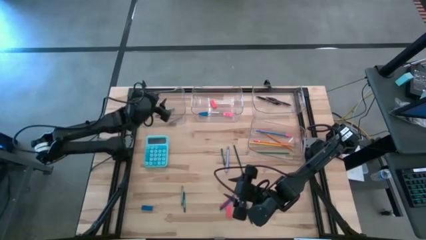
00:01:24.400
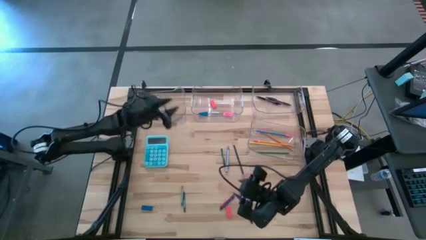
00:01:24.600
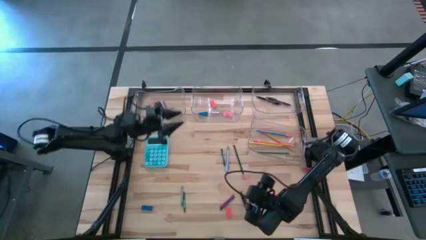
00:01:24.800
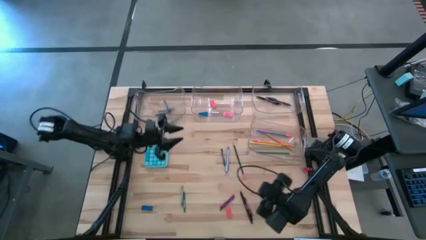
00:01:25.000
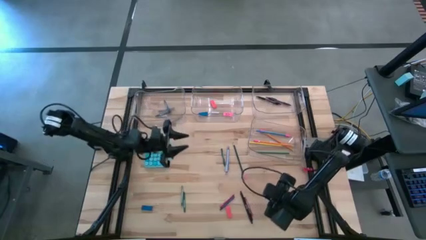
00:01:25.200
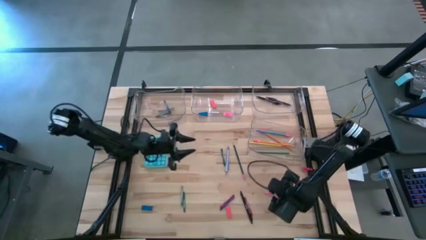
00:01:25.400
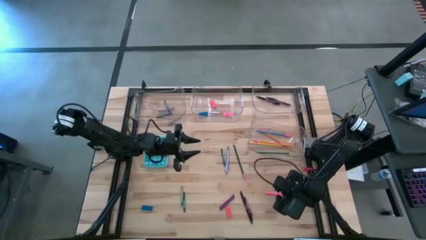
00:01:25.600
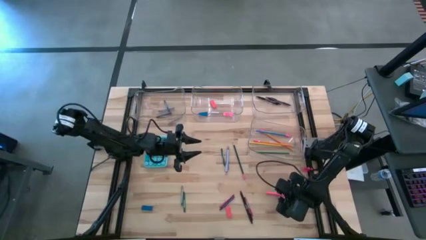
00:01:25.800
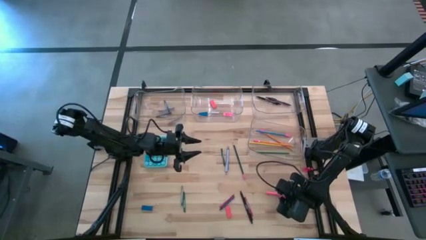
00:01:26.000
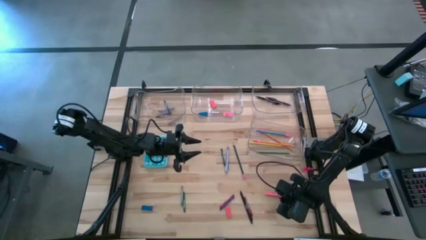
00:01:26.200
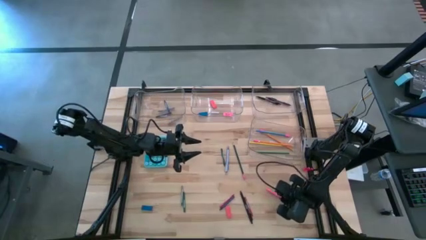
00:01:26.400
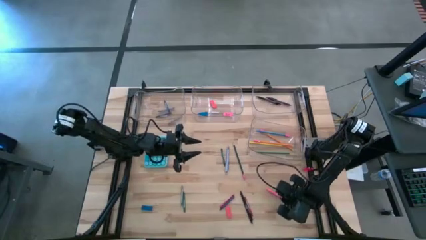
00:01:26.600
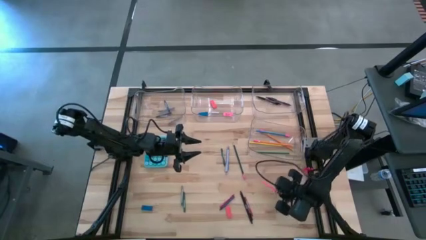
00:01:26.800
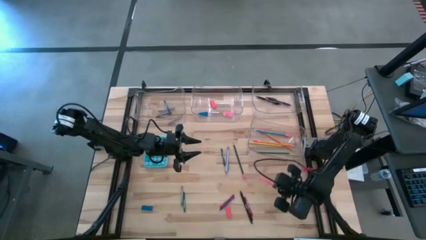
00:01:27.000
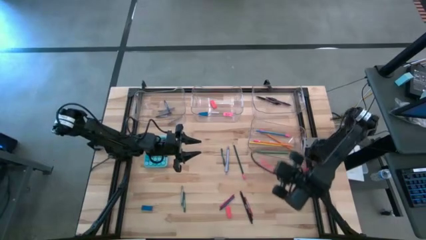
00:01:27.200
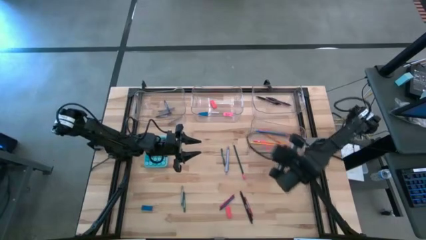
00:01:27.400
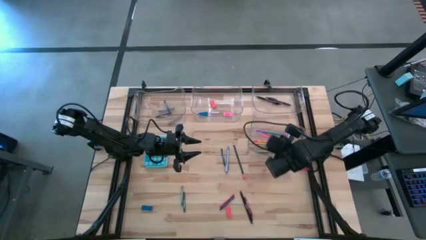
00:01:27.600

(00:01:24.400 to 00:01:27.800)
Task: Sort crayons/erasers/pens/pencils in bins
Put the pink colored pencil into the bottom transparent bin

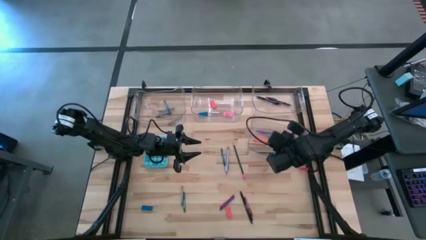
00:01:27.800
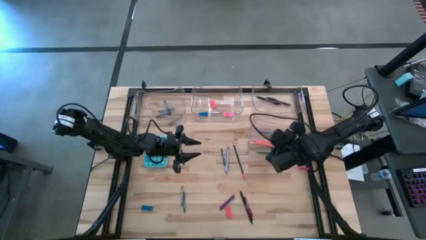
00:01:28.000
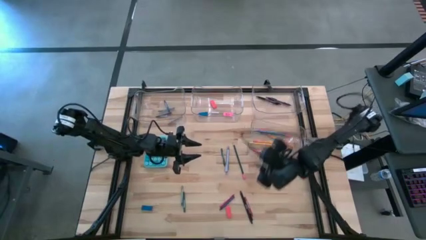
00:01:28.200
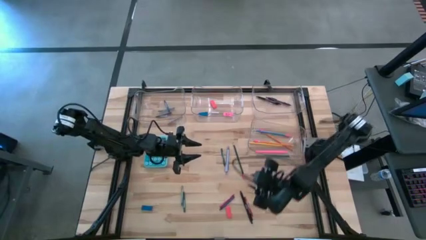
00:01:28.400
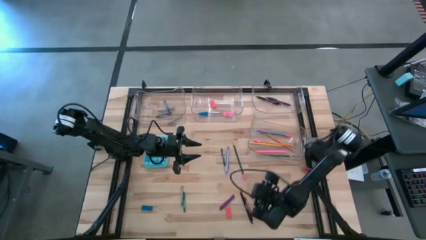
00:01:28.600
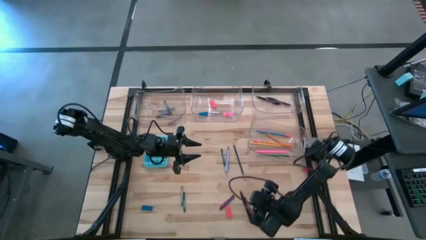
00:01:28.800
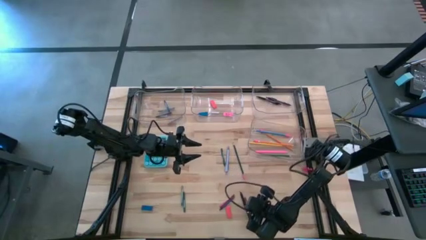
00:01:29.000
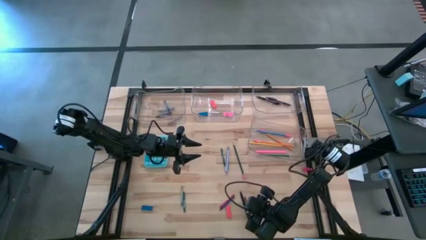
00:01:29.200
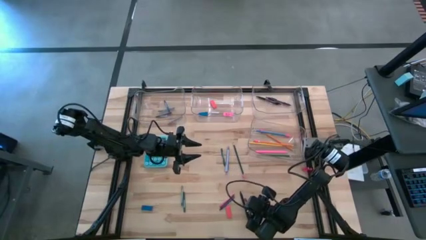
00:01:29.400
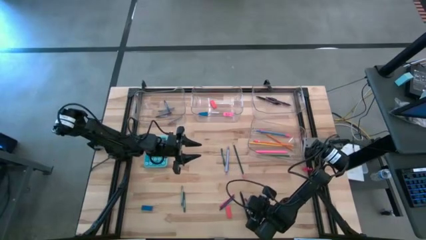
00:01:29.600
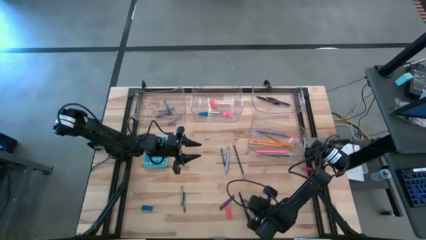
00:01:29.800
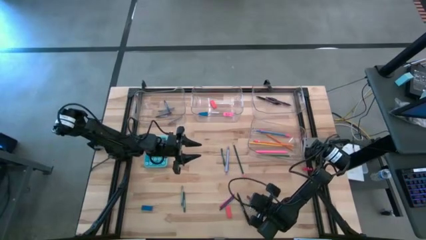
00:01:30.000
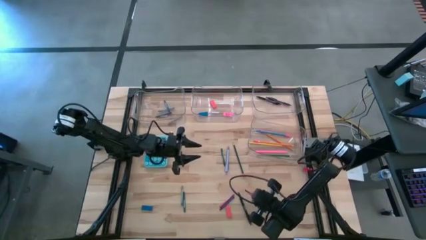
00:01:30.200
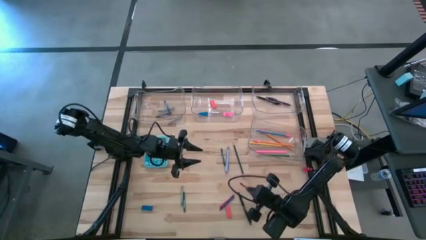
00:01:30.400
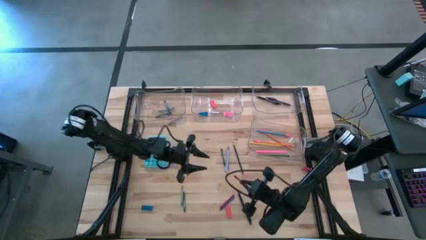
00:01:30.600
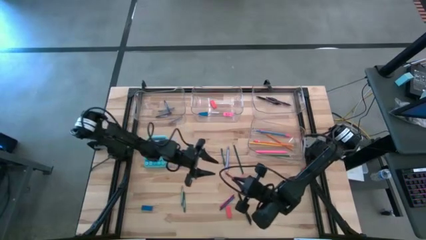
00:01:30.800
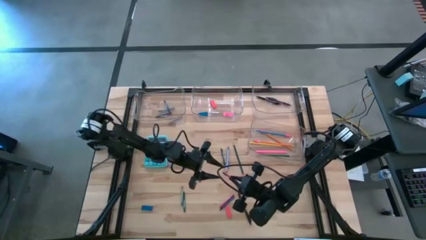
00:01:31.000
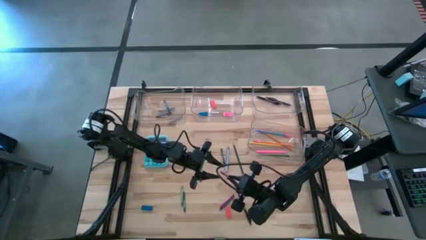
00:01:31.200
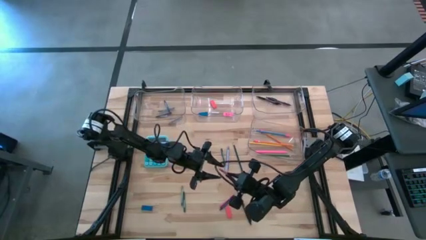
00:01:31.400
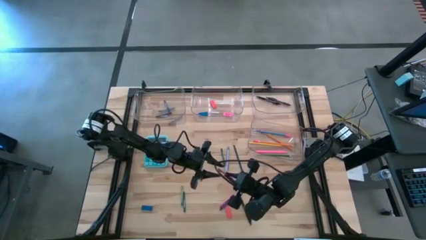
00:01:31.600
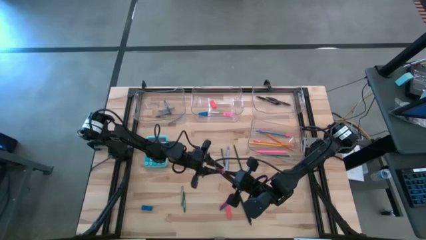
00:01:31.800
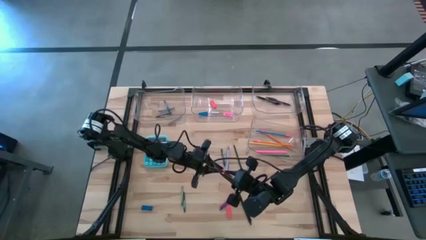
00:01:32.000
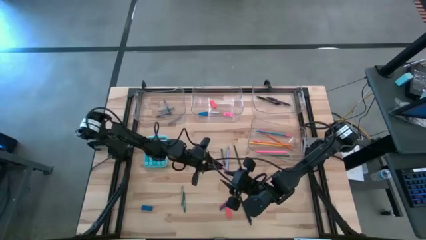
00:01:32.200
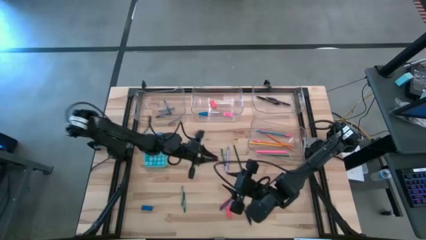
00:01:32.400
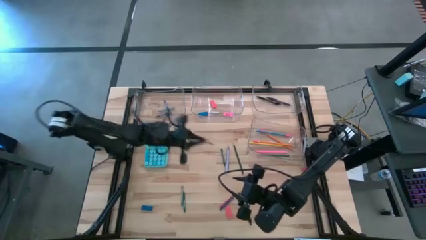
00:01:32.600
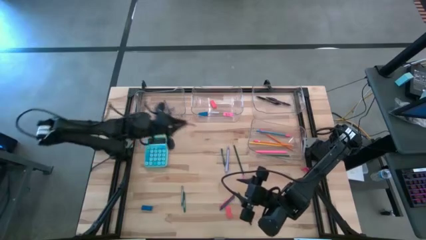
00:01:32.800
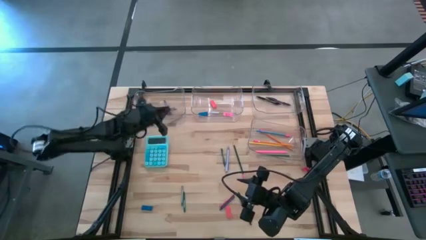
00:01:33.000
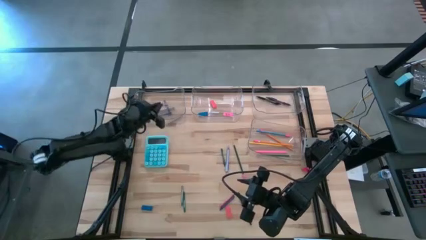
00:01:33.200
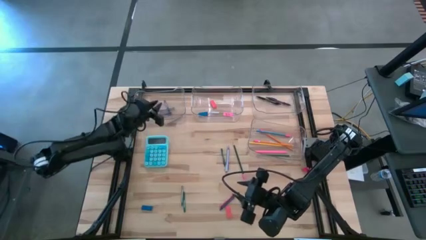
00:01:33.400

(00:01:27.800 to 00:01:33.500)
Put the red crayon into the top left transparent bin

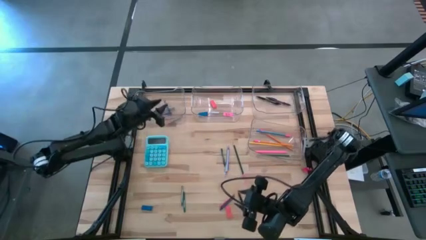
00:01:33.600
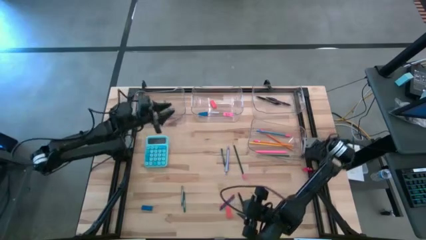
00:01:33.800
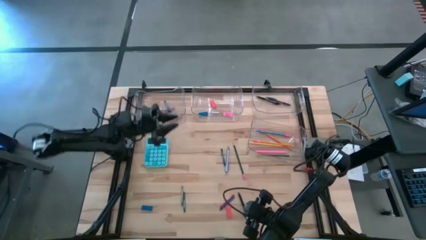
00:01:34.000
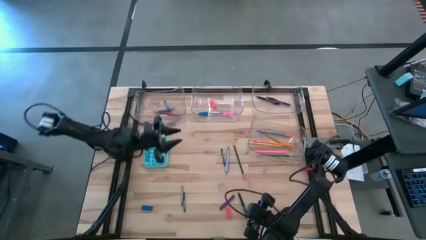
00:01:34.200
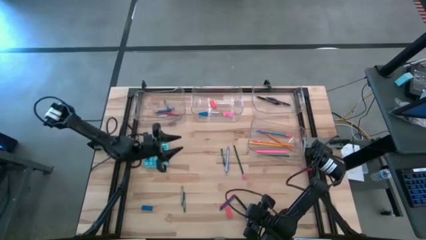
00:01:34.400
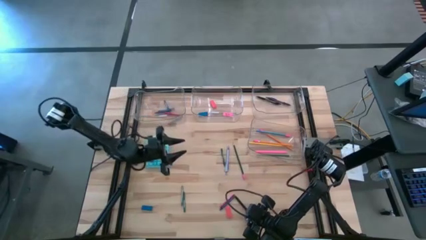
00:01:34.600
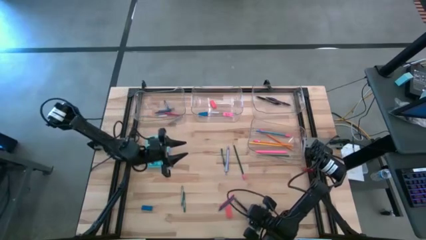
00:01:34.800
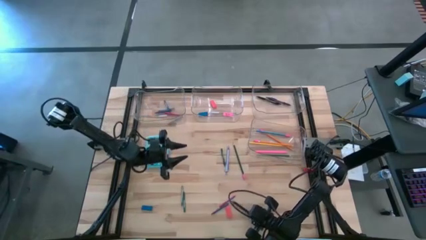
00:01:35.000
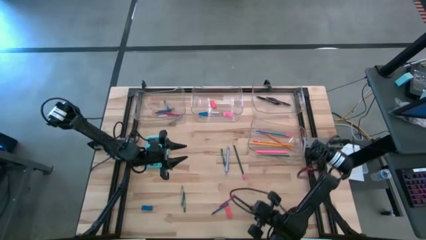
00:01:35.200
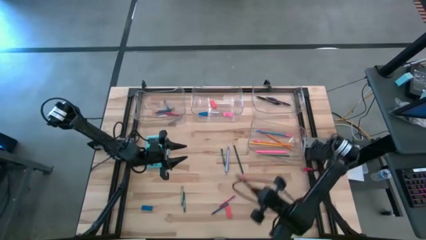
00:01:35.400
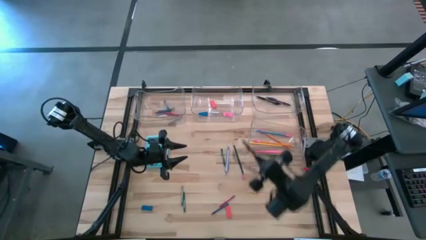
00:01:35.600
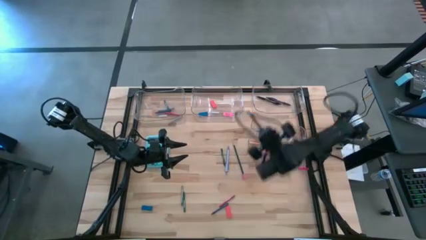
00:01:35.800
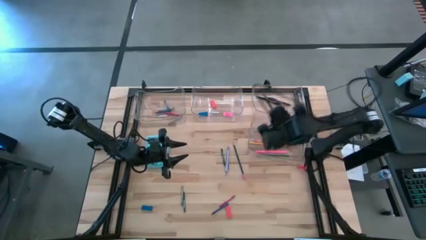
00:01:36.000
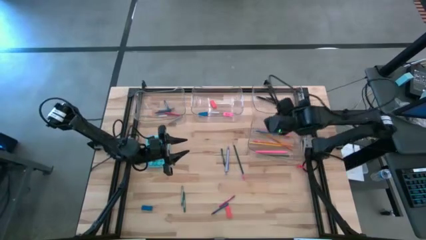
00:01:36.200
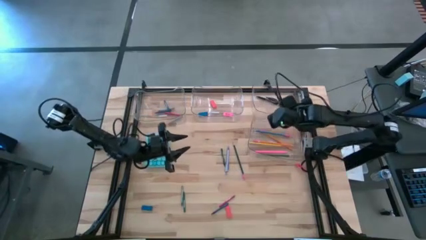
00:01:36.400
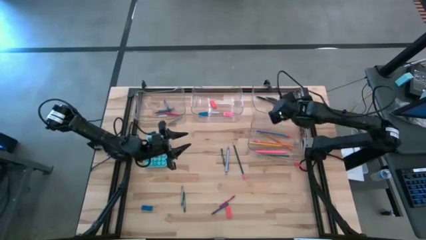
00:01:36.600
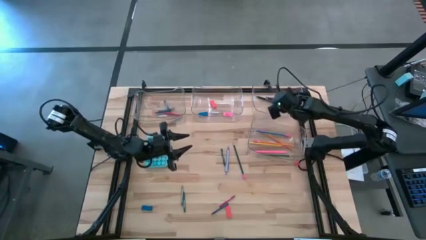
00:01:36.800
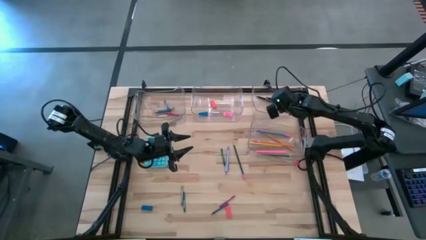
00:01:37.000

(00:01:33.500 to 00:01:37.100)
Put the black pen into the top right transparent bin

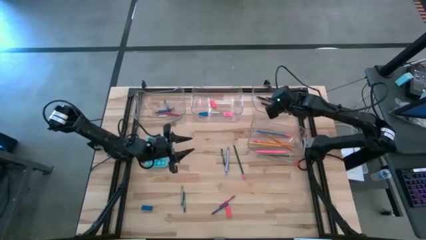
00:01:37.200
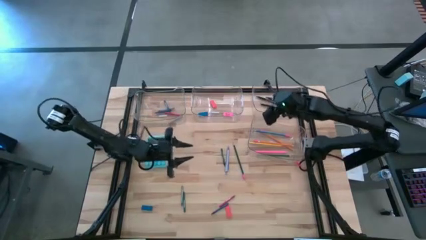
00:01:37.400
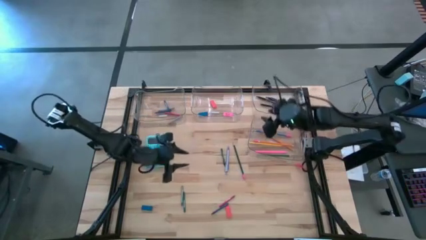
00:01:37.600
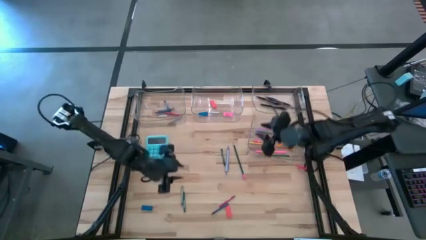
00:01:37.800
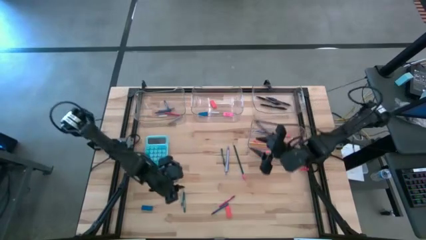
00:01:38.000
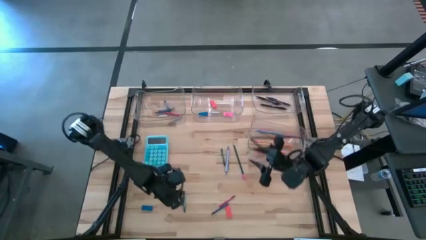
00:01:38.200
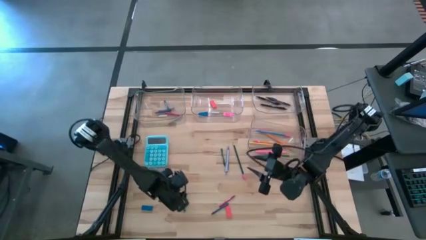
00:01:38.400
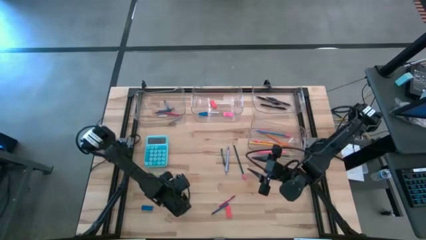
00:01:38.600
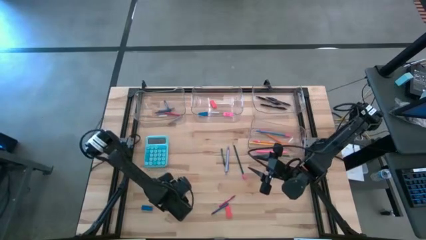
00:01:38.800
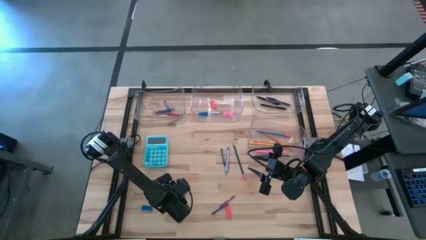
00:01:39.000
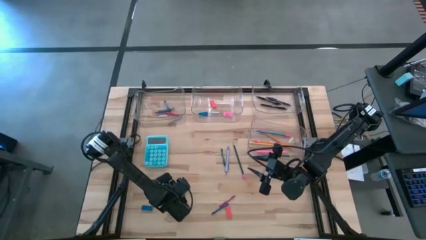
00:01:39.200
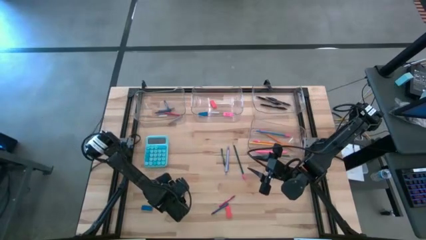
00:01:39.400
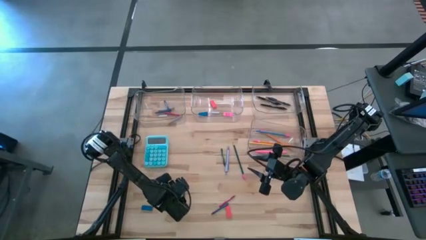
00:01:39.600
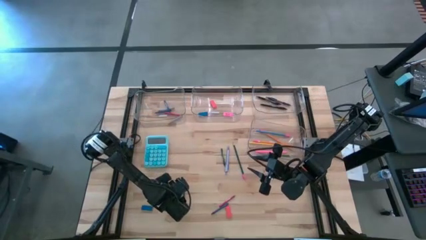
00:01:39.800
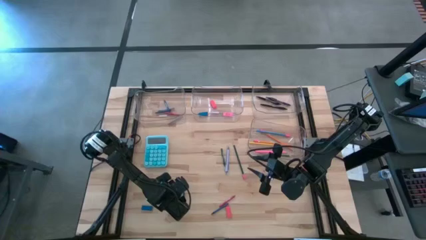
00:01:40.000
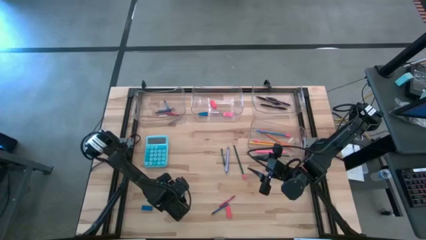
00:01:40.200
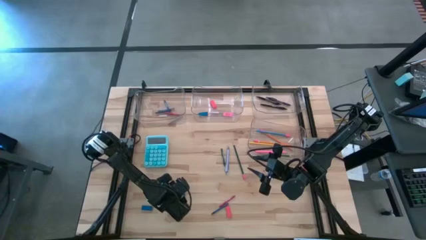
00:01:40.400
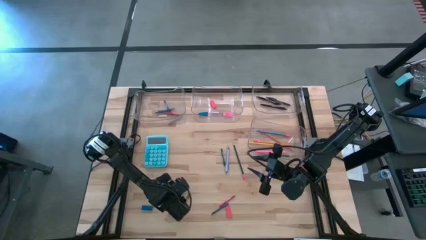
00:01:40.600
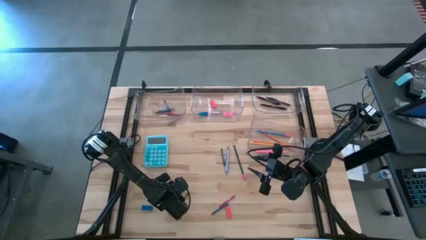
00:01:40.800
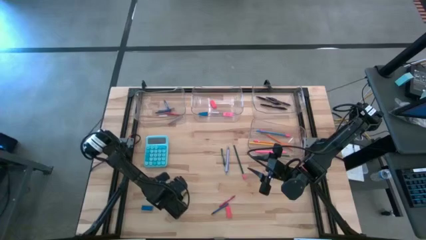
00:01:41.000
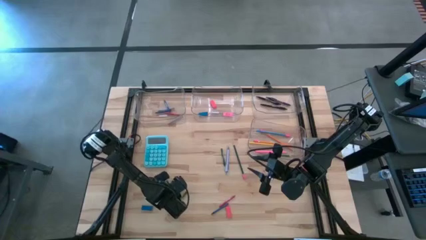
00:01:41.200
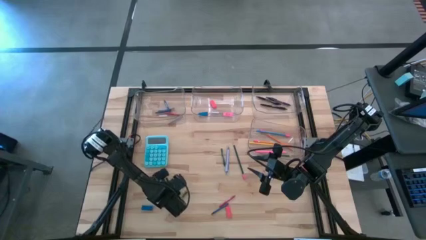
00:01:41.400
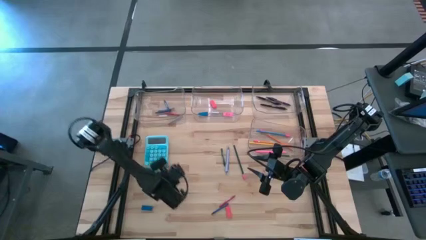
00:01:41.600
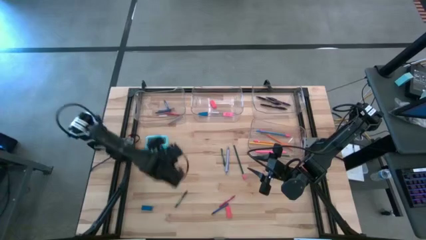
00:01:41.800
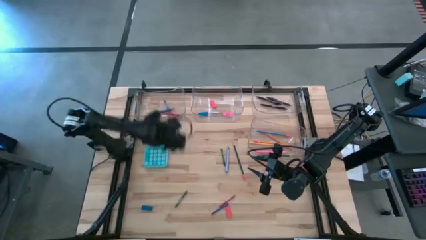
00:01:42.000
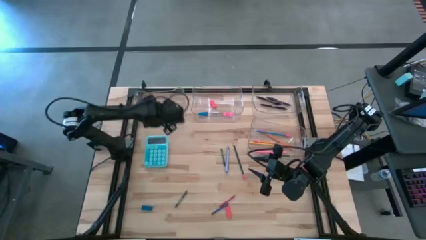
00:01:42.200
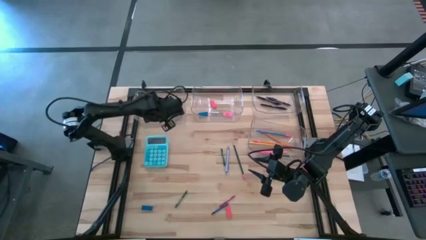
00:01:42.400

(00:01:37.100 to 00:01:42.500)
Put the gray crayon into the top left transparent bin
